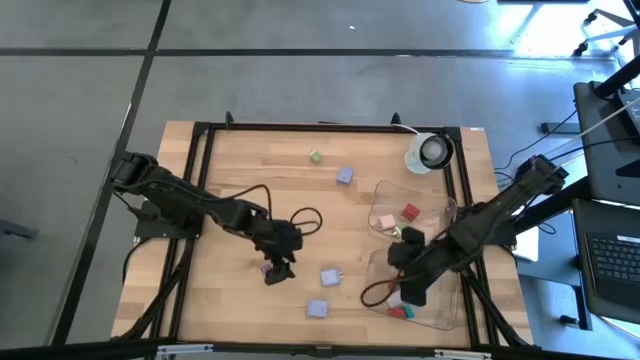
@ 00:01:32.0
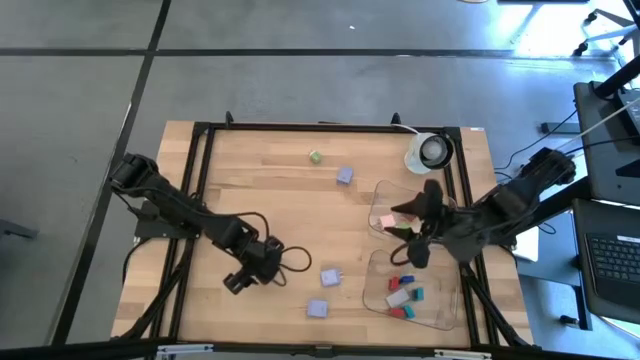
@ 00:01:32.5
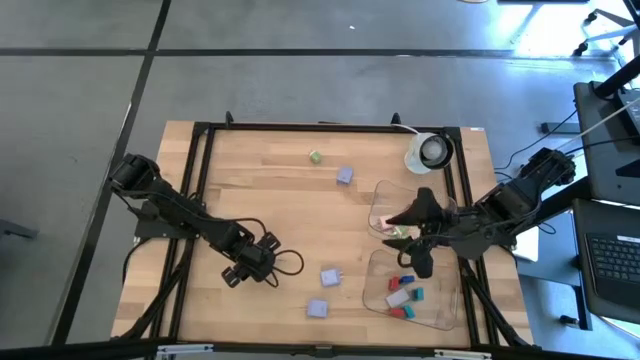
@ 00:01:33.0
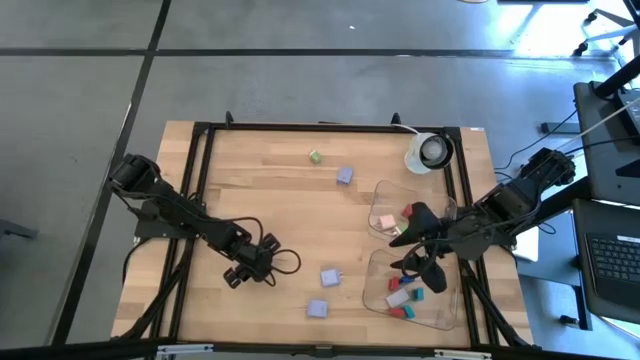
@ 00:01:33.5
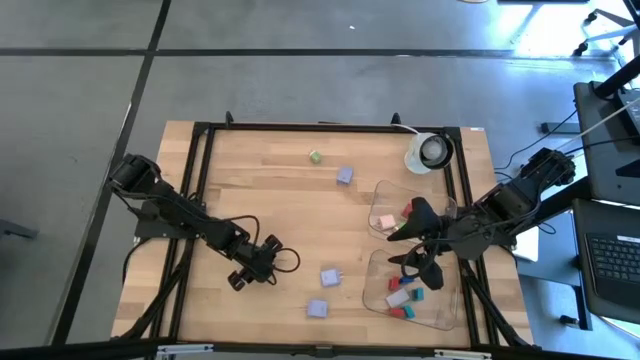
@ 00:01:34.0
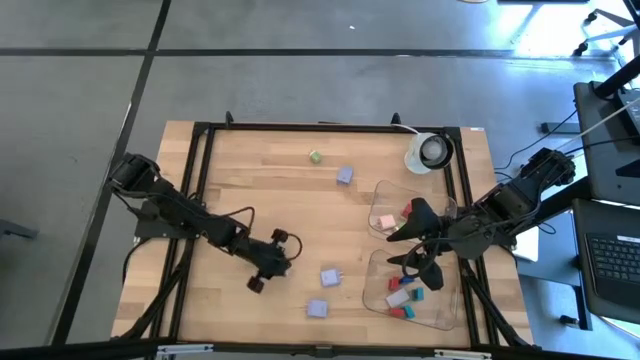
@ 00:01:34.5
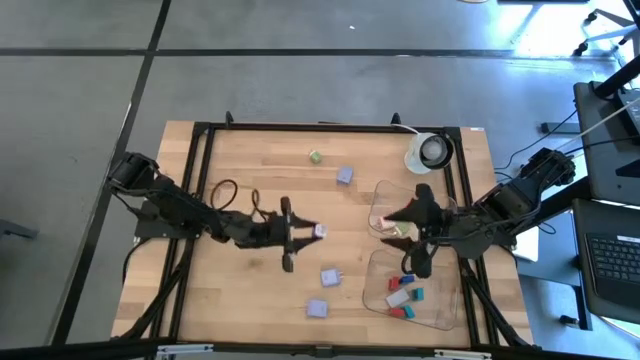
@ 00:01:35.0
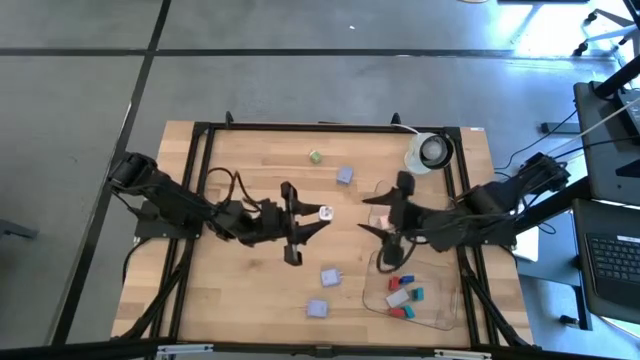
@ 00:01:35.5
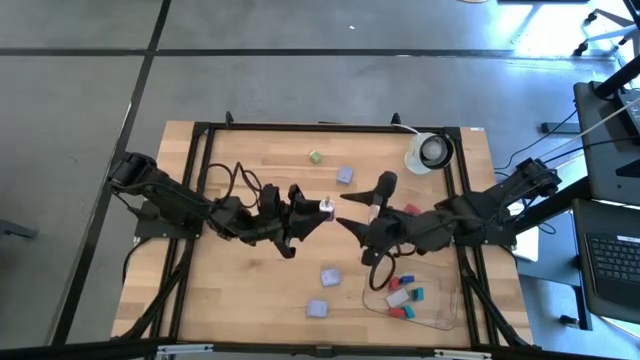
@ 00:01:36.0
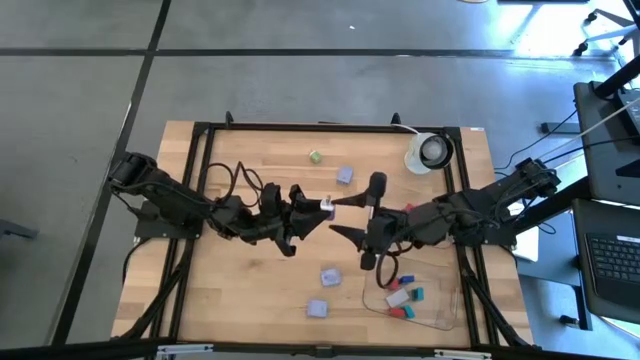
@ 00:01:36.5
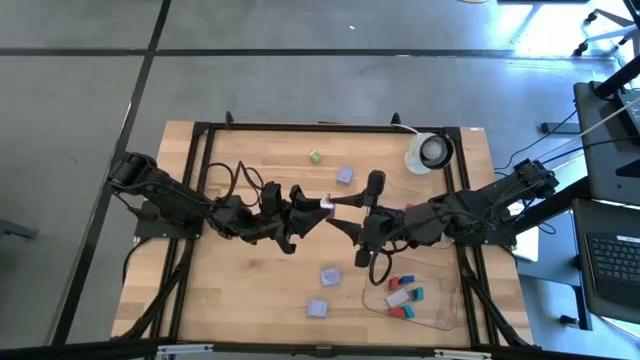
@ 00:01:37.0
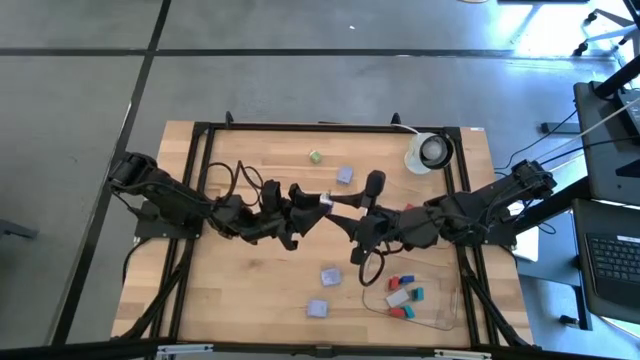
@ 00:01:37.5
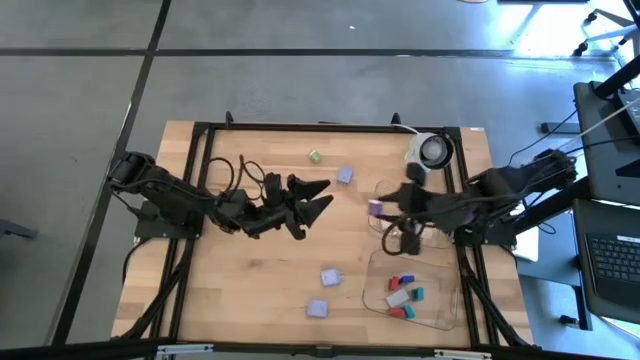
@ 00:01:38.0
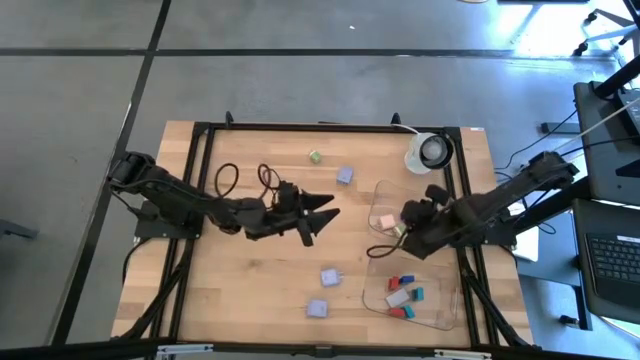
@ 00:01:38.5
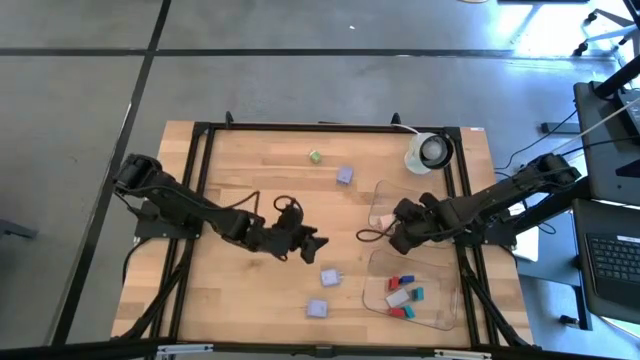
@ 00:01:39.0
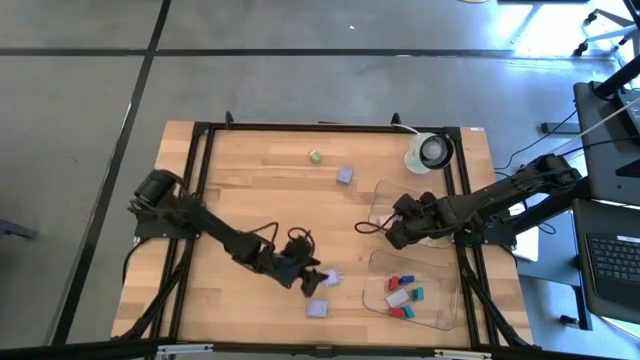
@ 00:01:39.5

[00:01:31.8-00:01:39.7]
Task: Pick & Place Office items
Put the dark blue charger adapter into the top transparent bin

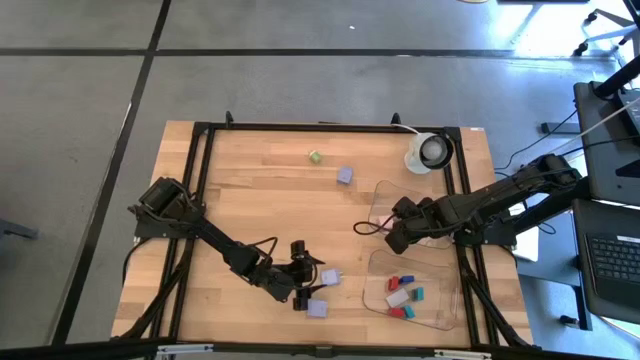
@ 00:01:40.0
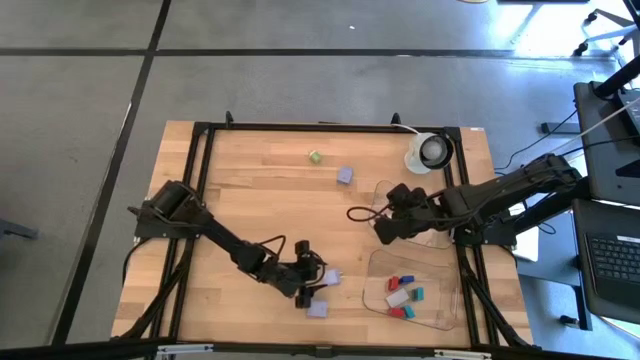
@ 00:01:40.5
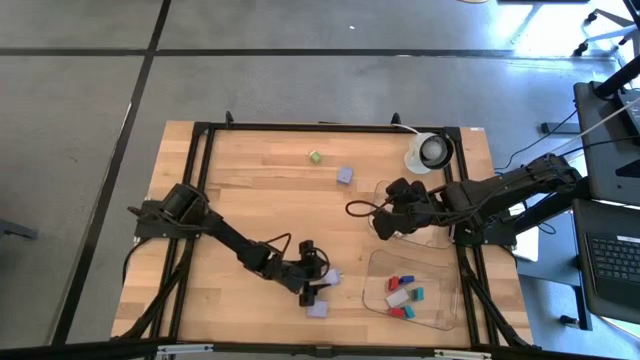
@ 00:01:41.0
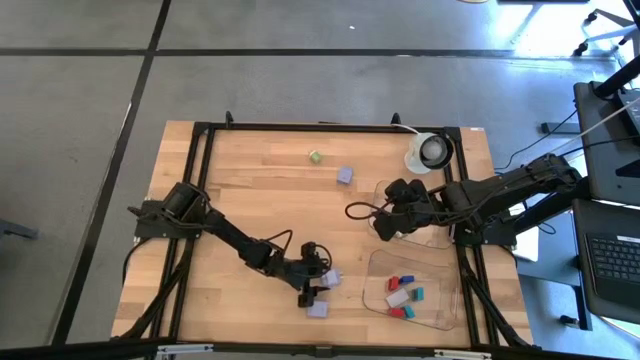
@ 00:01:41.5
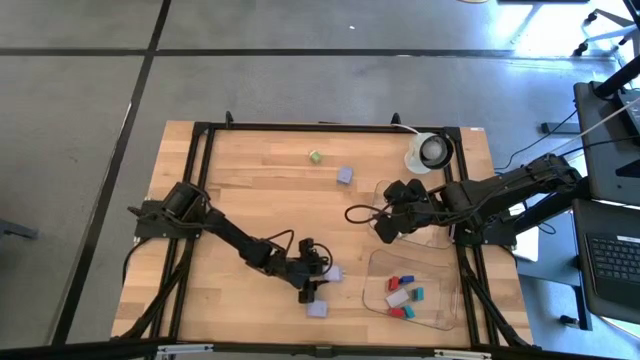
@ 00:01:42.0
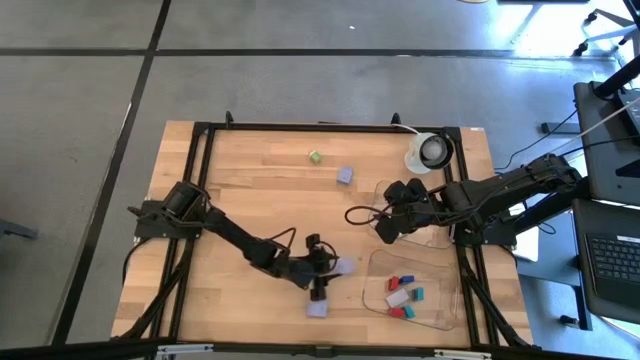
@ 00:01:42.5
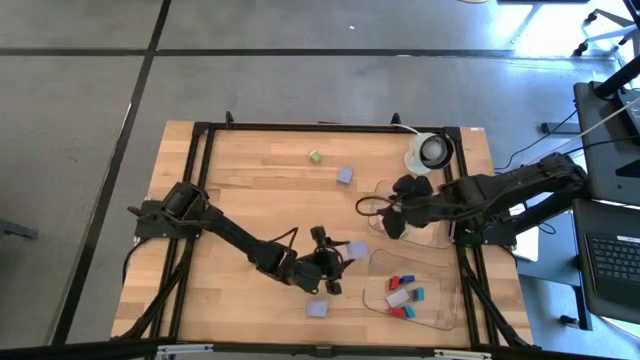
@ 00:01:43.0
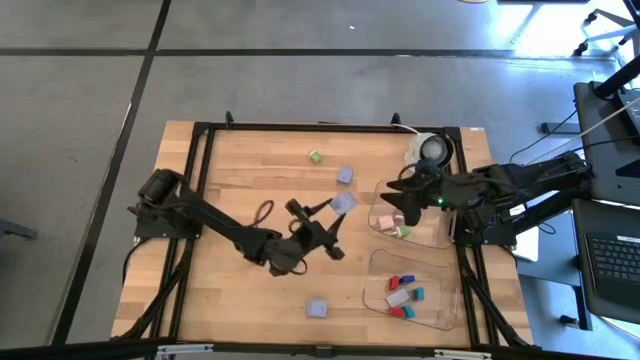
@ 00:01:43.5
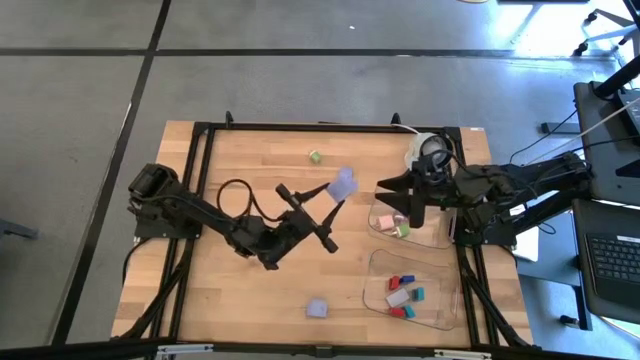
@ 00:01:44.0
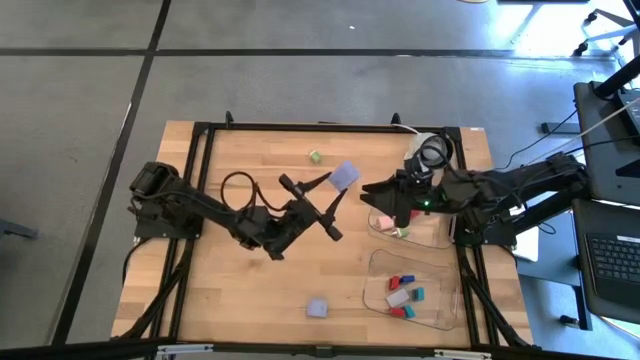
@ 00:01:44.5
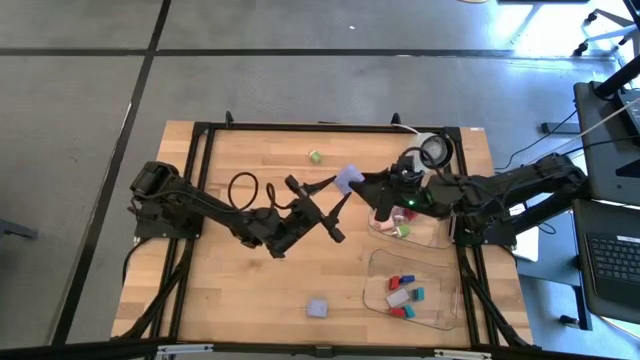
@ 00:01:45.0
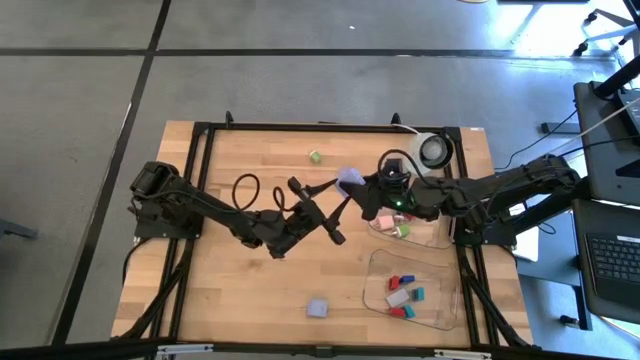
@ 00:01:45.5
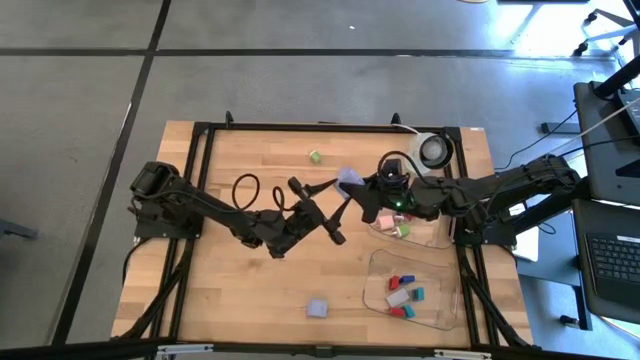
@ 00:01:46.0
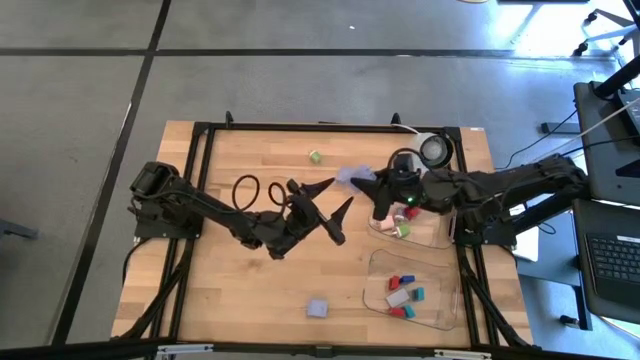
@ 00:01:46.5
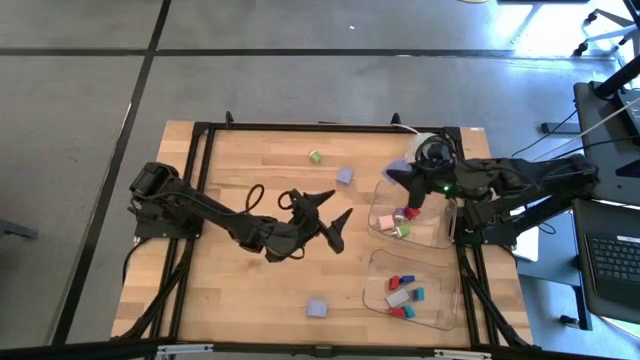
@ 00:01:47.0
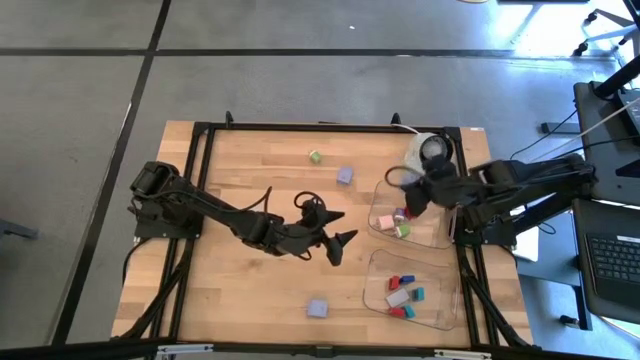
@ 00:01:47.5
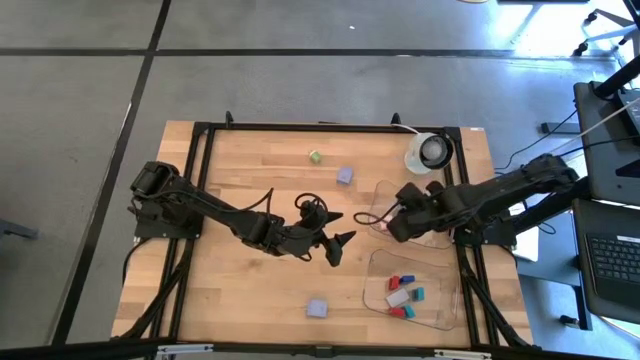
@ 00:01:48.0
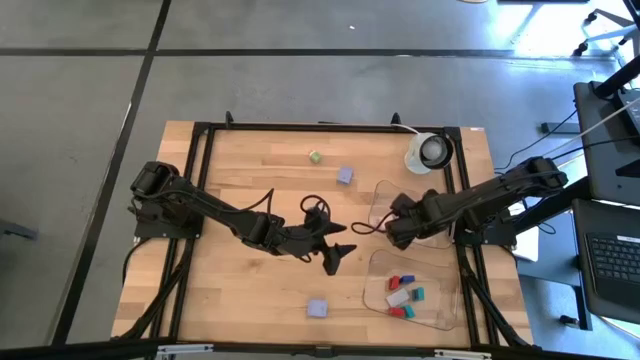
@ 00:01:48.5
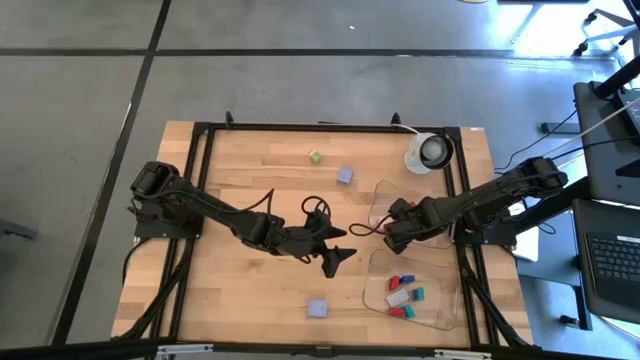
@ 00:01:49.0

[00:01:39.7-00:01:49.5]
Put the middle blue charger adapter into the top transparent bin

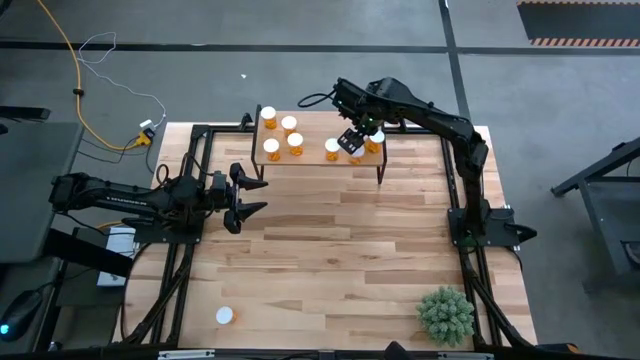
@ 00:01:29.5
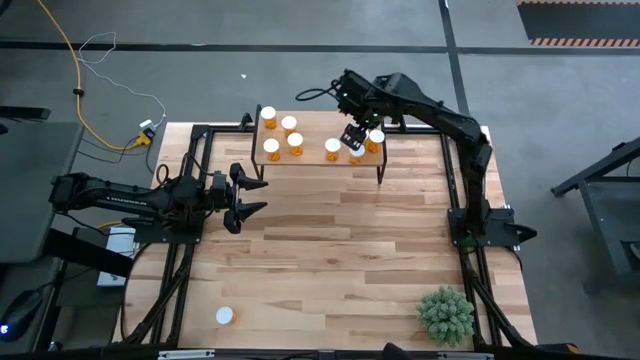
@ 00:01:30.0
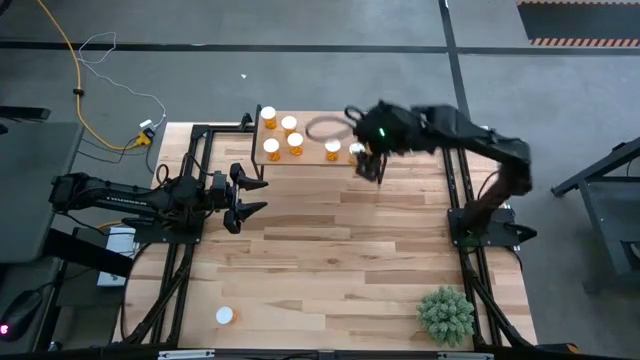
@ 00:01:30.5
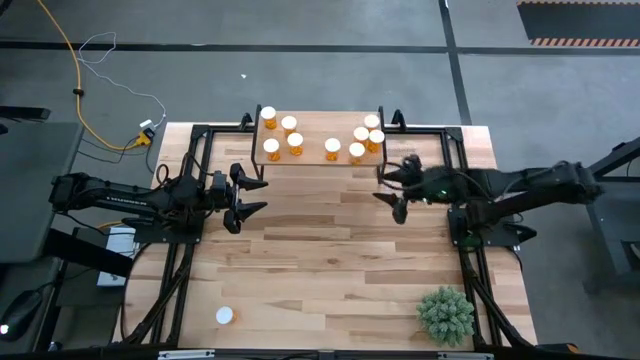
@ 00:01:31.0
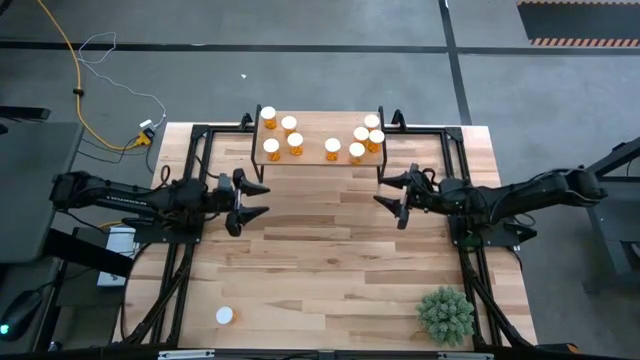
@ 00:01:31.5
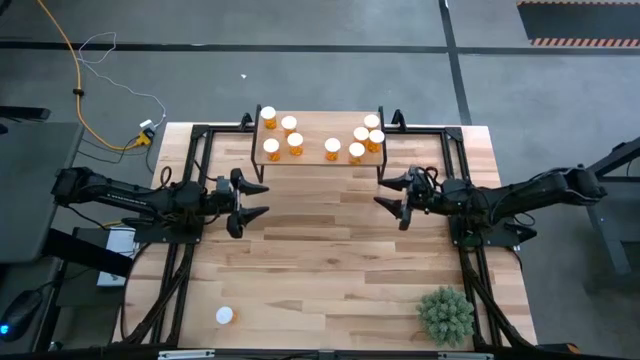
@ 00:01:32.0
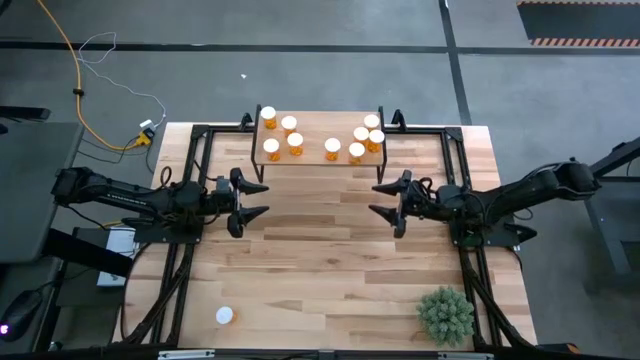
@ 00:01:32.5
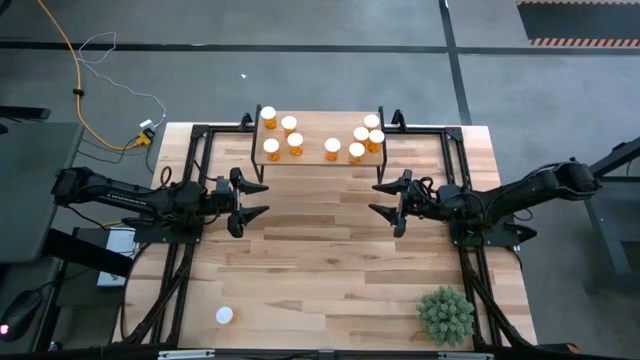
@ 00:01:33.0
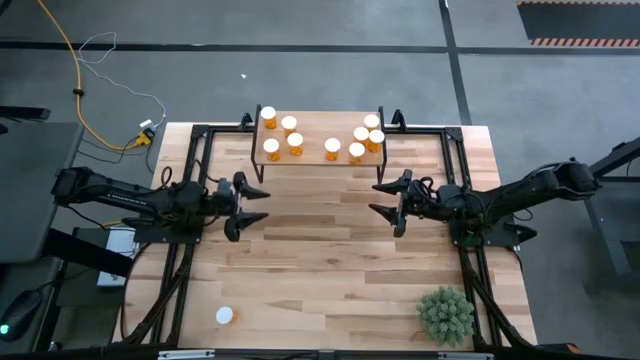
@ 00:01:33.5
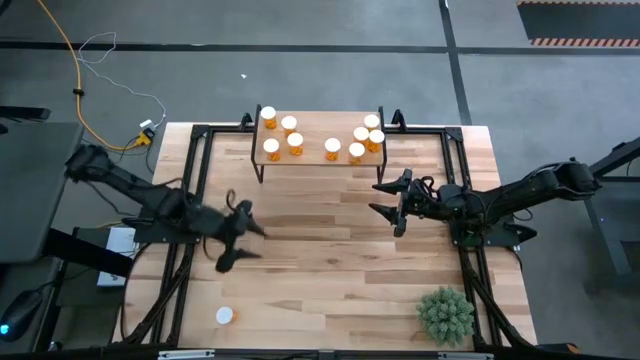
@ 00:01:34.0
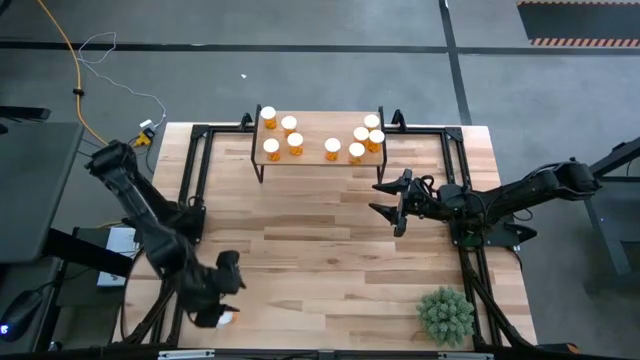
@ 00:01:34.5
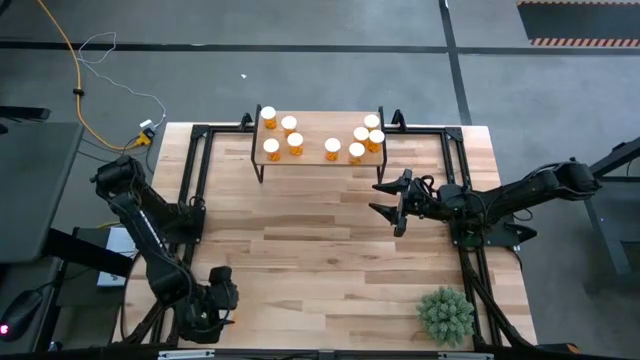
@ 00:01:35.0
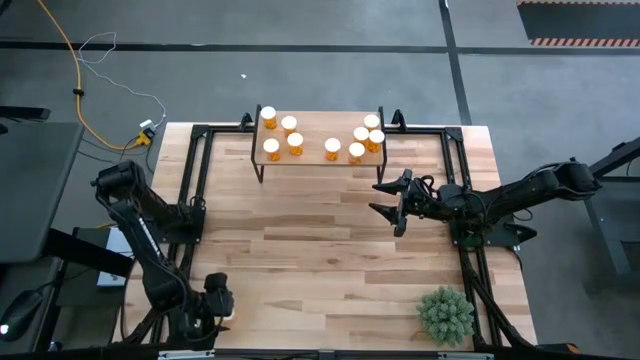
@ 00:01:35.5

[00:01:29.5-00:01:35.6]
Task: Pick and place medicine bottles onto shelf by color
Put the orange pill bottle on the shelf
